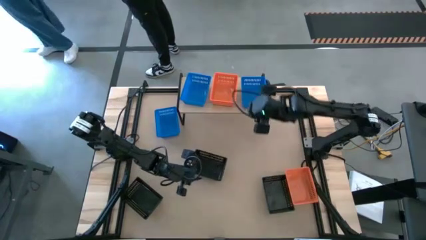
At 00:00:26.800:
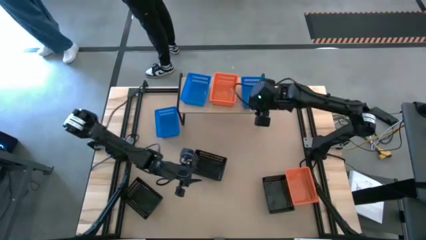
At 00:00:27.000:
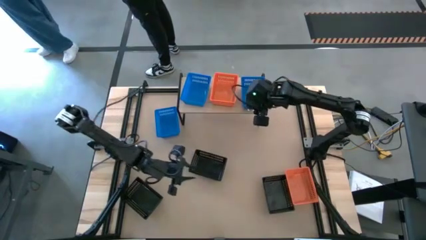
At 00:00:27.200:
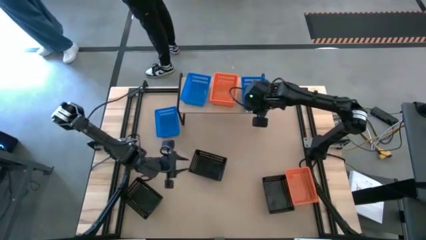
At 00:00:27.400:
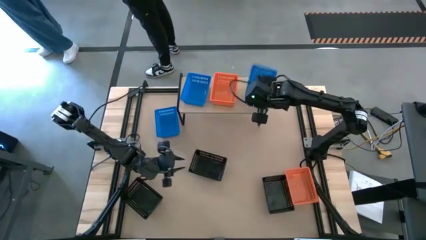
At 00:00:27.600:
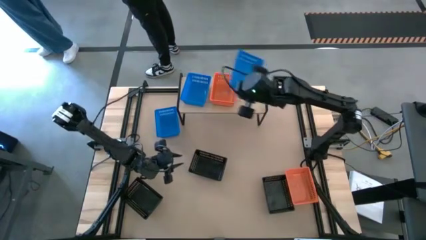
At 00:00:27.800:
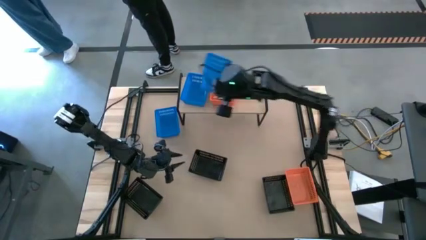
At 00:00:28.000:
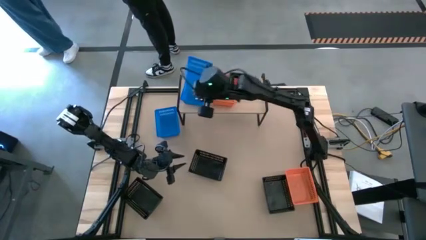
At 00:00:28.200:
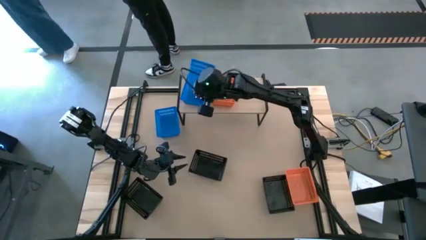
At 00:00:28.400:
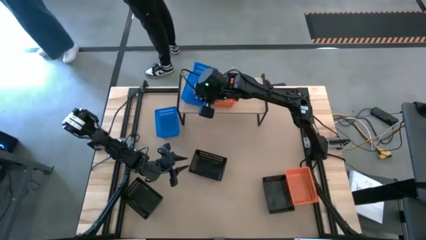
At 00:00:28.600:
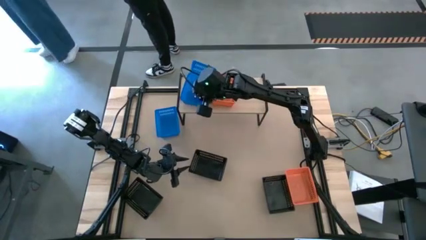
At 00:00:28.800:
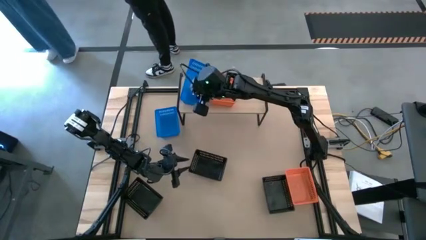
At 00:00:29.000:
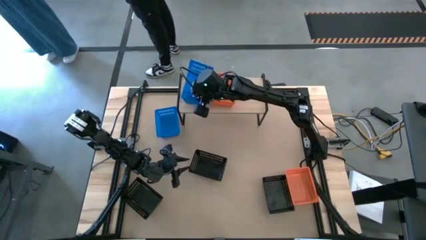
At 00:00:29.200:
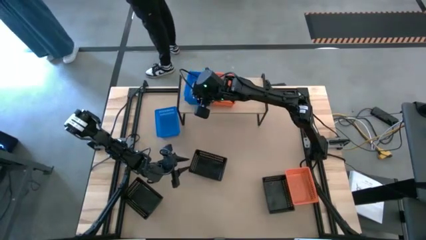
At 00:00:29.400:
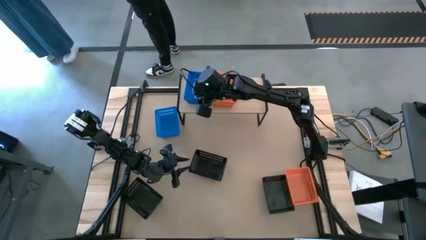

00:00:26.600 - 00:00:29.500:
Task: Stack baskets on shelf by color
Stack the right blue basket on the shelf on top of the left blue basket on the shelf

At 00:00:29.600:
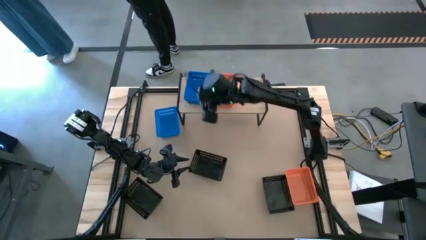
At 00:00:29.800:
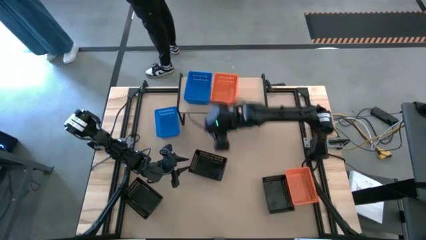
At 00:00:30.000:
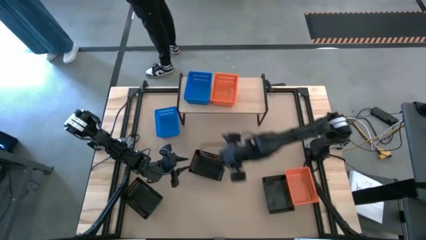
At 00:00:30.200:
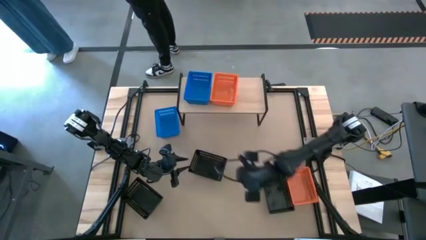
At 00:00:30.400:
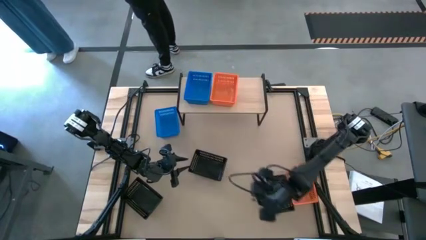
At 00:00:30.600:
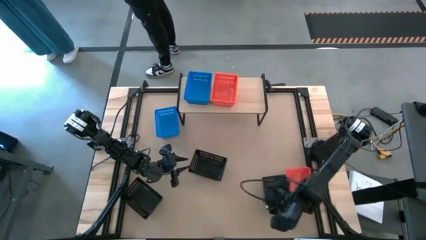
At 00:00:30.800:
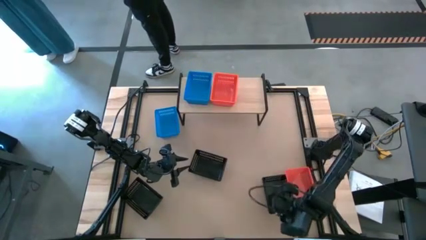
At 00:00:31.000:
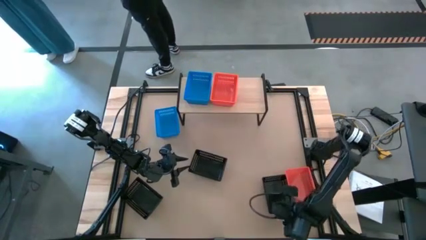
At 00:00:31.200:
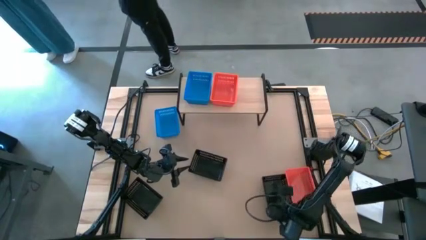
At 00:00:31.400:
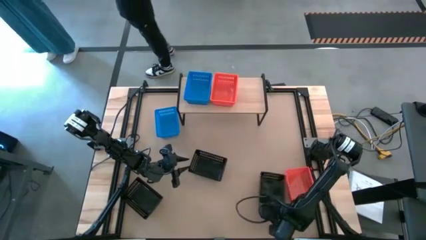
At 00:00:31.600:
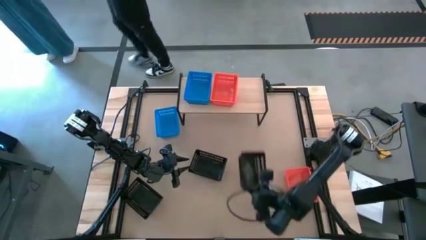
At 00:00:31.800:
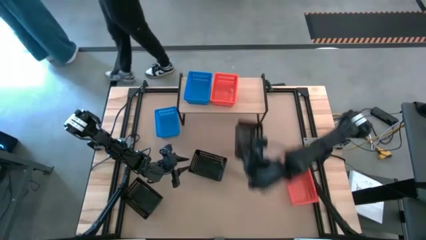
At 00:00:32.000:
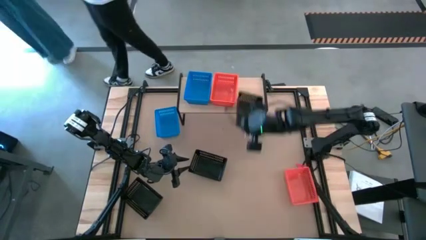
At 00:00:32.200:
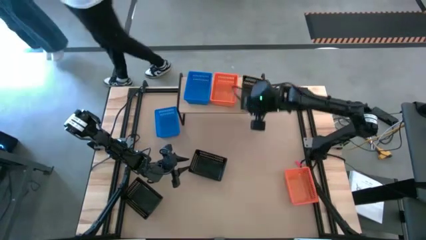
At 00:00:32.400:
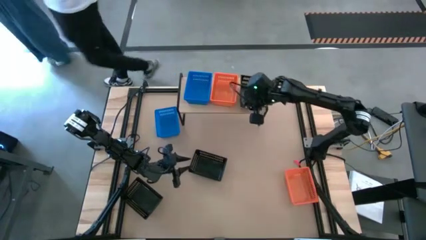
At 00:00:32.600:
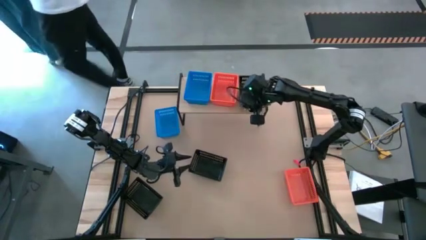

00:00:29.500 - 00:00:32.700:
Put the right black basket on the shelf

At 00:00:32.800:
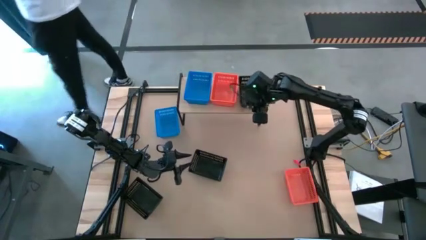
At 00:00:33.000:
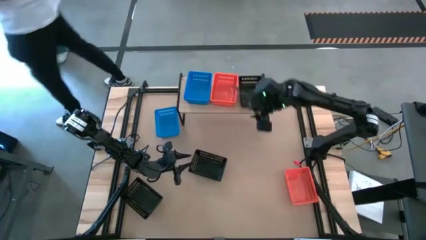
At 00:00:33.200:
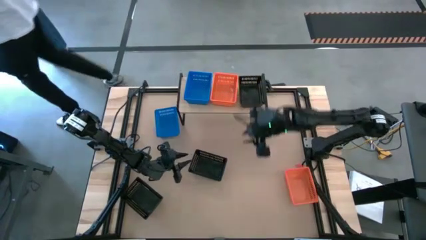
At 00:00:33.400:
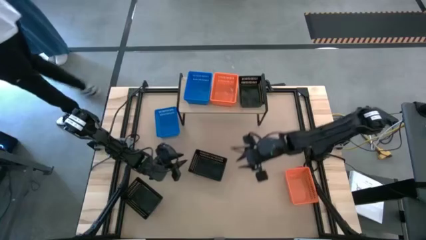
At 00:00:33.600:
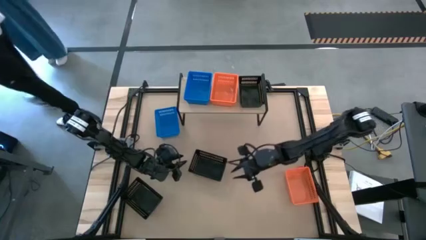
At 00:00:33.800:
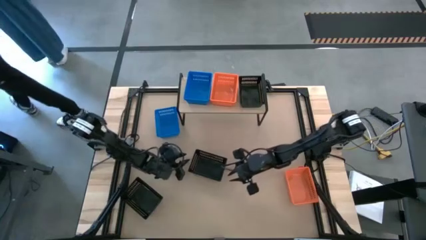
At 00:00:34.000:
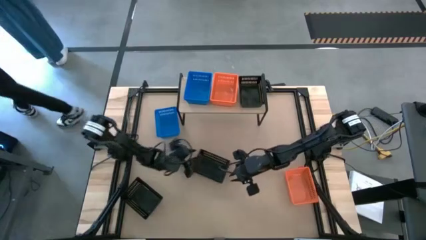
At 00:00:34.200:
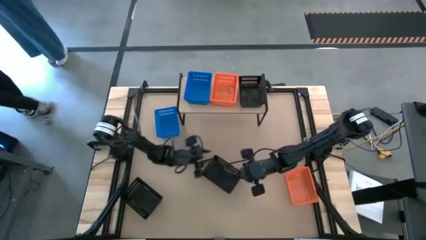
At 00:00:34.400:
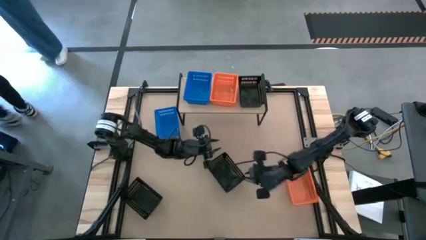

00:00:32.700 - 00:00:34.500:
Move the right black basket to the middle of the table

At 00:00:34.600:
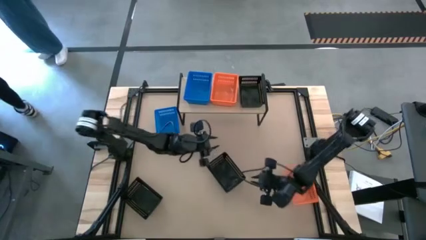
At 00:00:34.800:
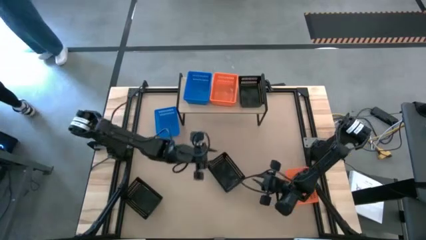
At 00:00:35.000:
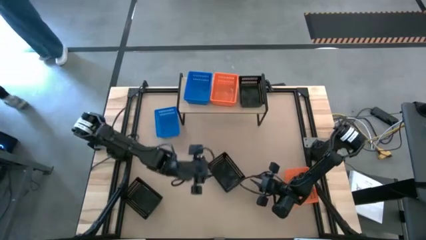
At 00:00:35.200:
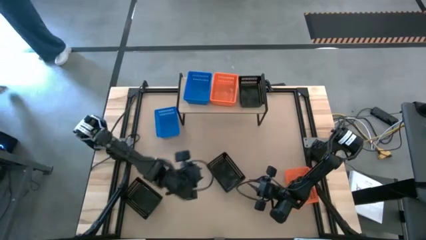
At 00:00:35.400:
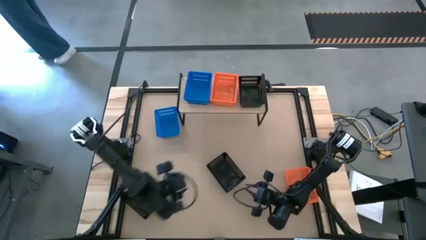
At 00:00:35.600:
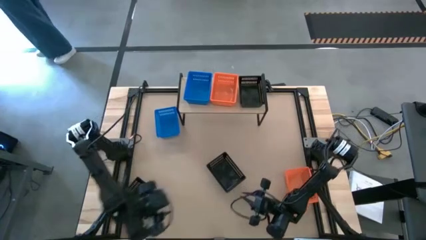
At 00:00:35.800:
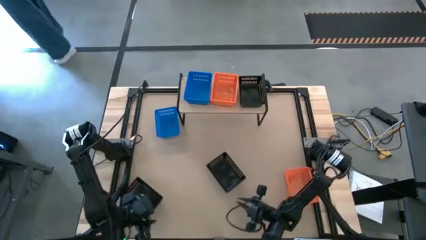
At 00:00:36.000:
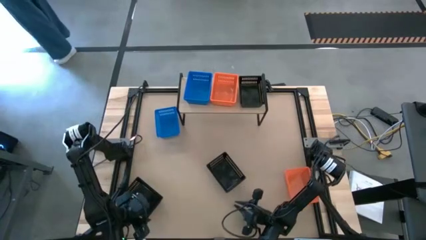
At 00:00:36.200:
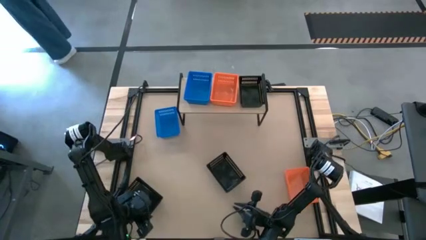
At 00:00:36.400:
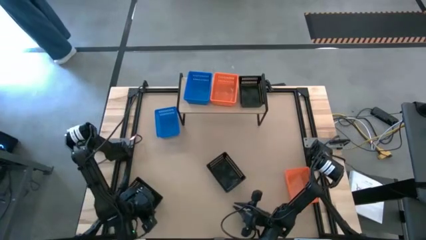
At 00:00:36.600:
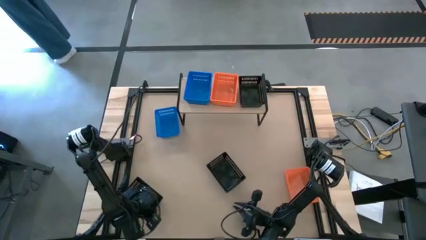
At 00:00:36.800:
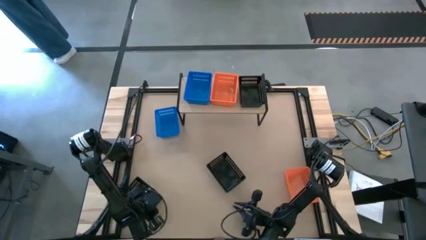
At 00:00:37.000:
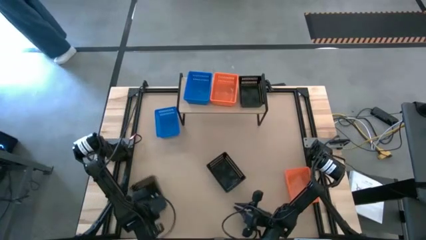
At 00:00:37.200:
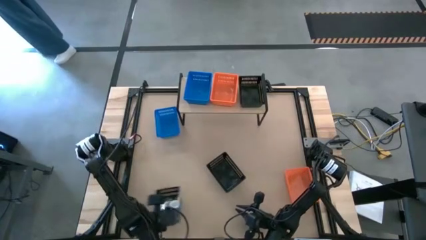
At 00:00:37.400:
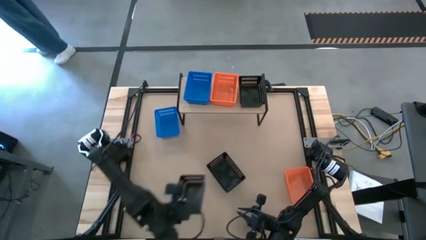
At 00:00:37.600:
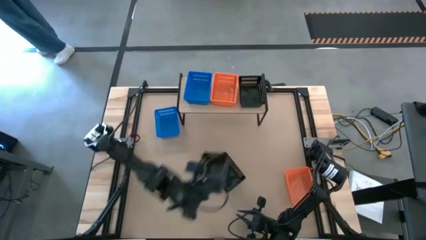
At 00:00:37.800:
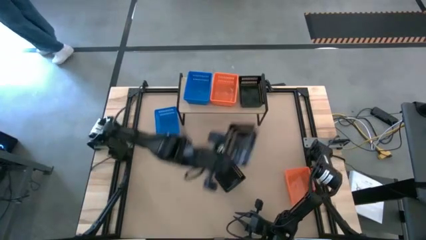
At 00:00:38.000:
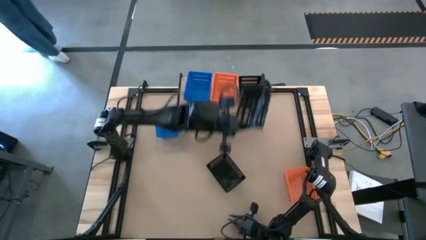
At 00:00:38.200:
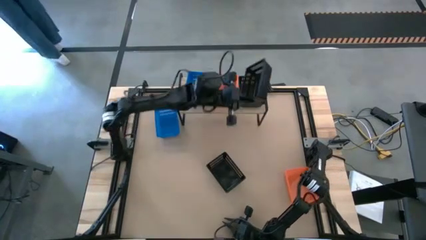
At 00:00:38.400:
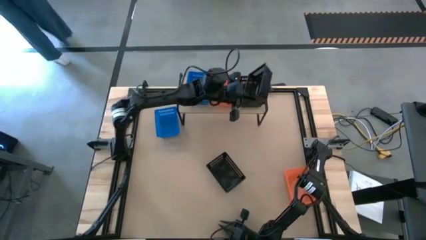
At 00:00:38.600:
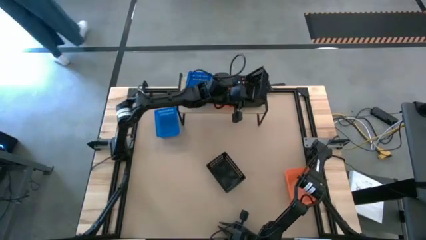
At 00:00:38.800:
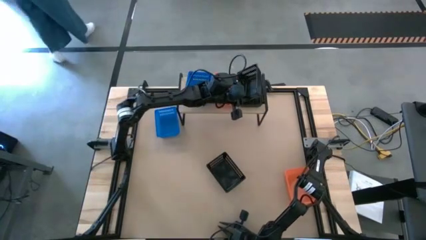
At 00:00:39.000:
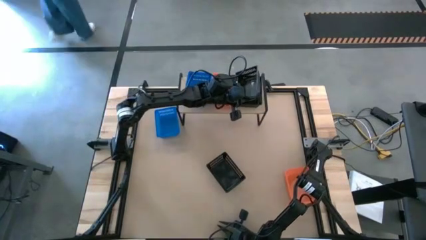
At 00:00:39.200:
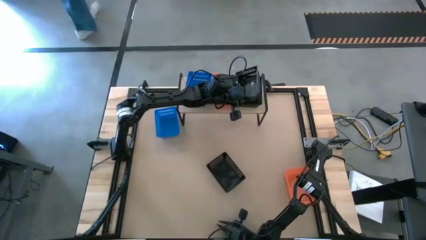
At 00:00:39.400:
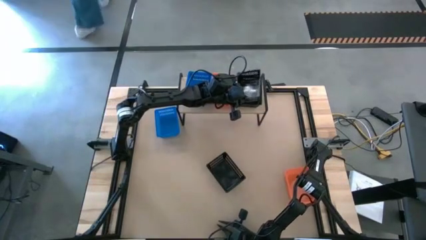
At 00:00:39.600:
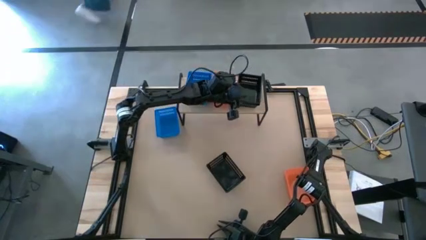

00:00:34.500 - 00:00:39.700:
Stack the left black basket on top of the black basket on the shelf

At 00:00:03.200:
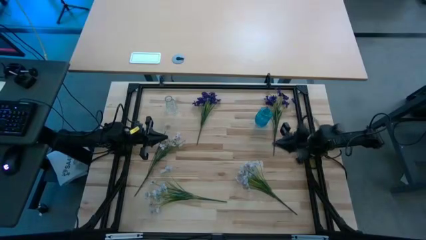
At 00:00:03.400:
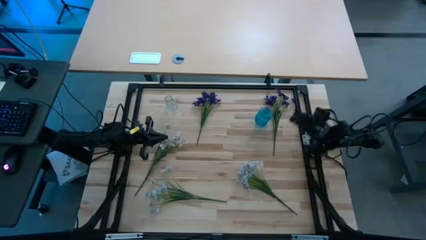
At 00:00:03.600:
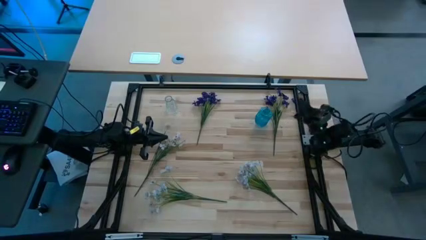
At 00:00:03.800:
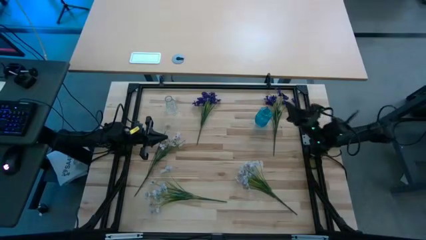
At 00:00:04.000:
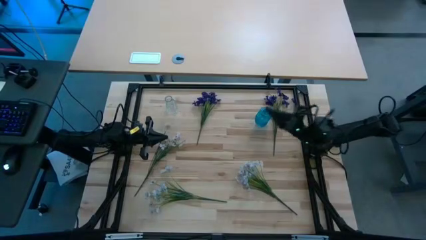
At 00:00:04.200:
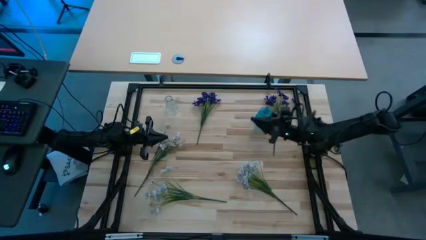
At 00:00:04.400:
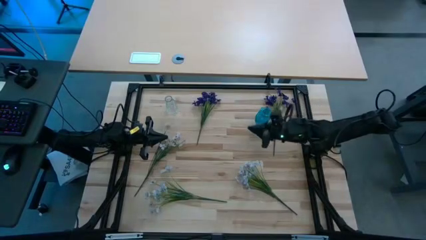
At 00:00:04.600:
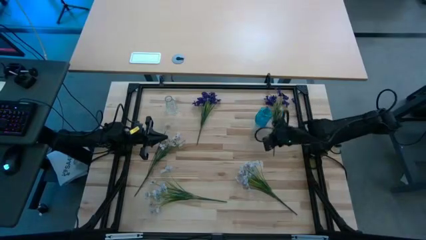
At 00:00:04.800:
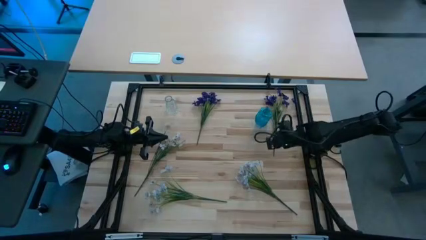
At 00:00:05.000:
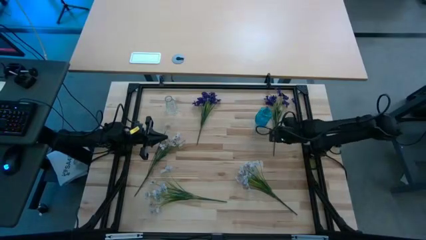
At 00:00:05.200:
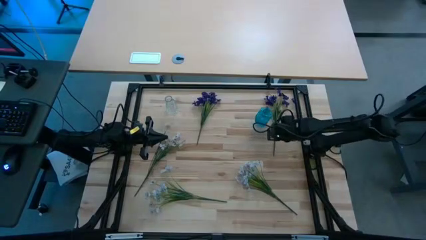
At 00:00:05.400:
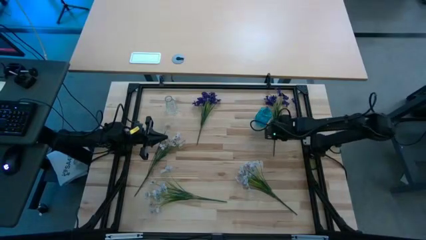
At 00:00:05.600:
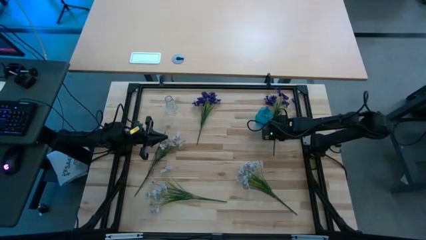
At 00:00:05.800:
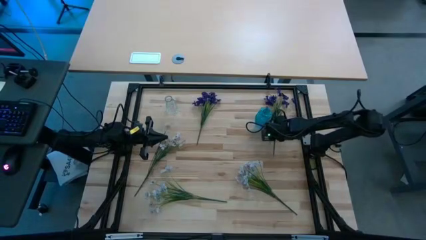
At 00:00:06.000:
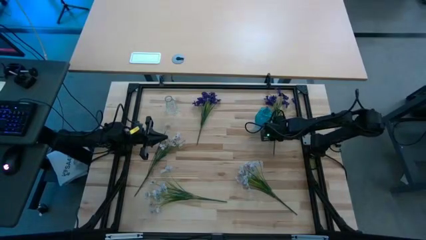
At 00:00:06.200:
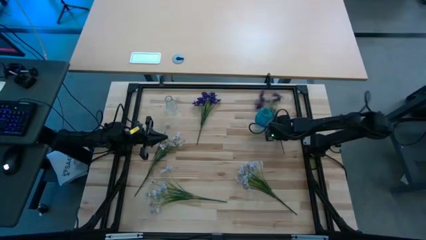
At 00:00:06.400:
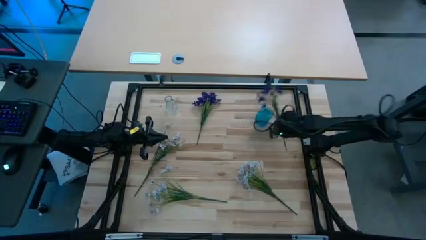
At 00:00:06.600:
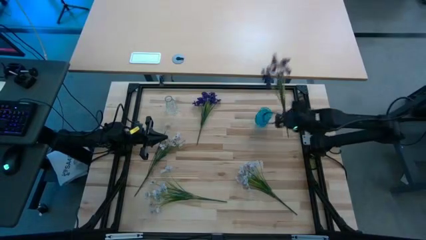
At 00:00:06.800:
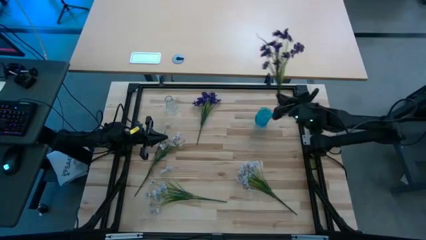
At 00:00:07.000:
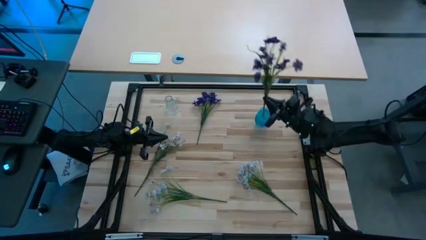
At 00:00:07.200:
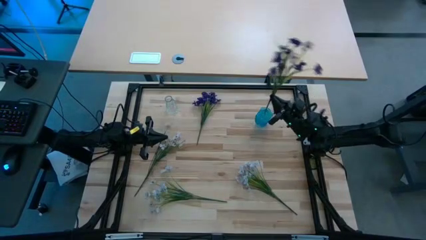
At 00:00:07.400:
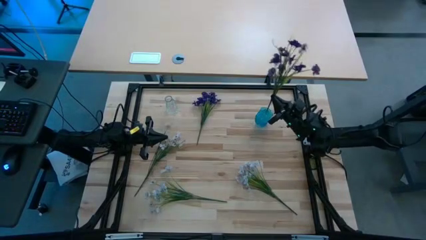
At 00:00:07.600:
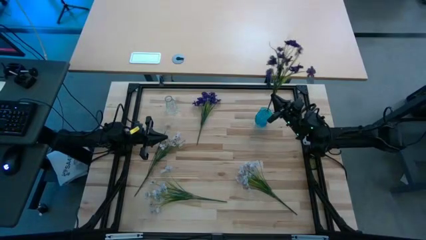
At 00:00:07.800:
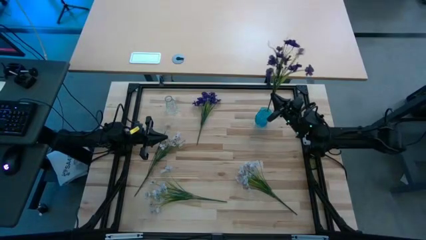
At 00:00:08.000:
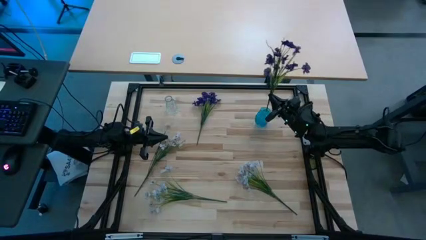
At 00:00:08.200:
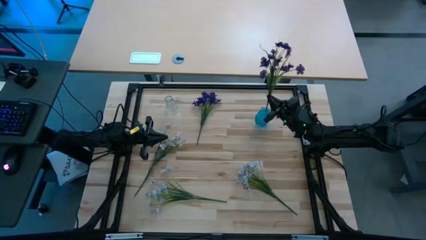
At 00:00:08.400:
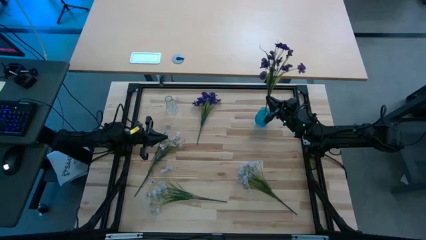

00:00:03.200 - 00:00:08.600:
Task: Sort flowers into vase by color
Put the right purple flowers into the blue flower vase
